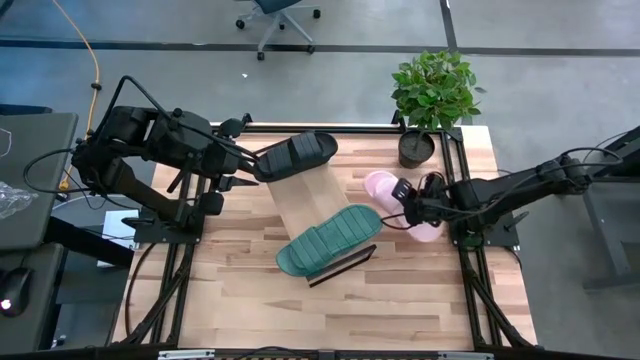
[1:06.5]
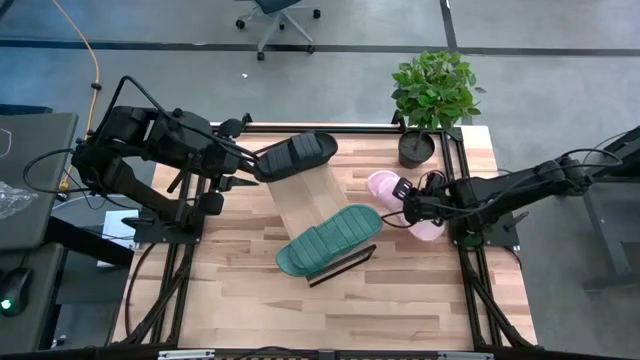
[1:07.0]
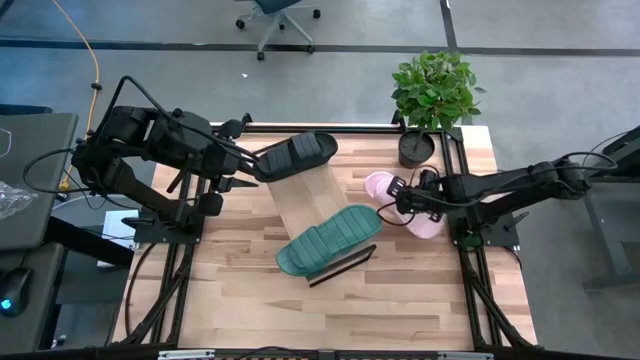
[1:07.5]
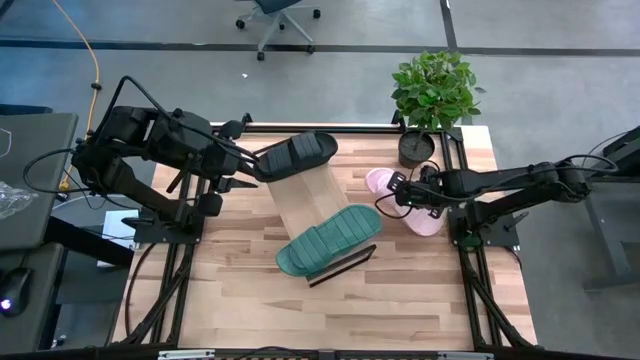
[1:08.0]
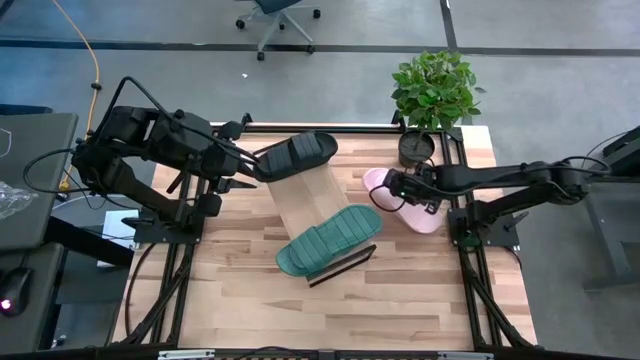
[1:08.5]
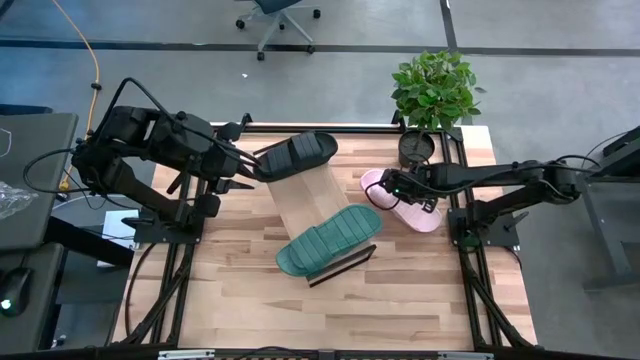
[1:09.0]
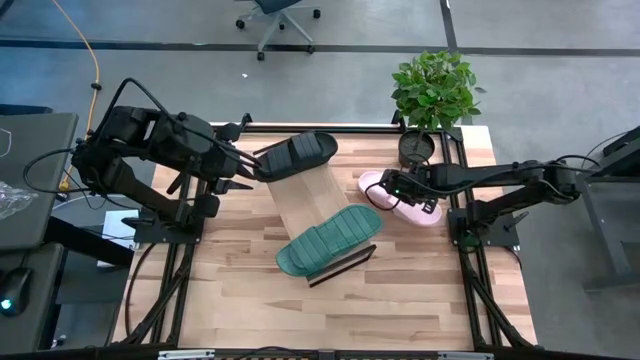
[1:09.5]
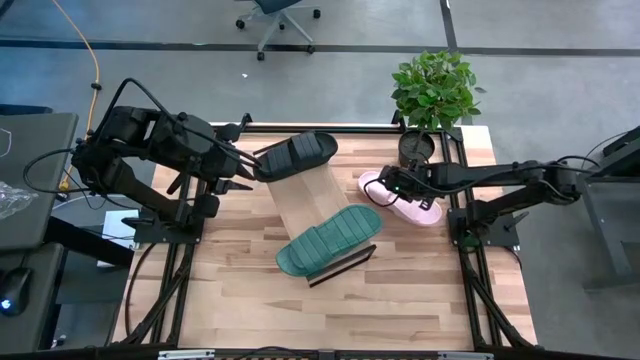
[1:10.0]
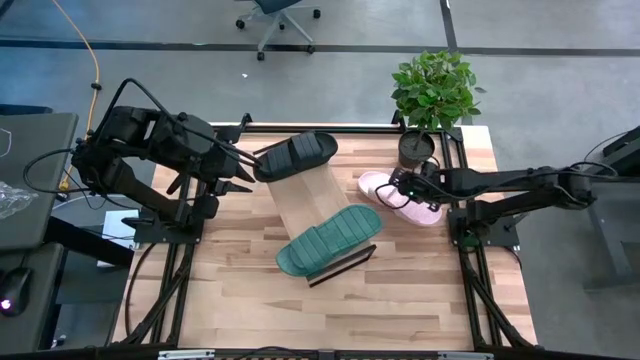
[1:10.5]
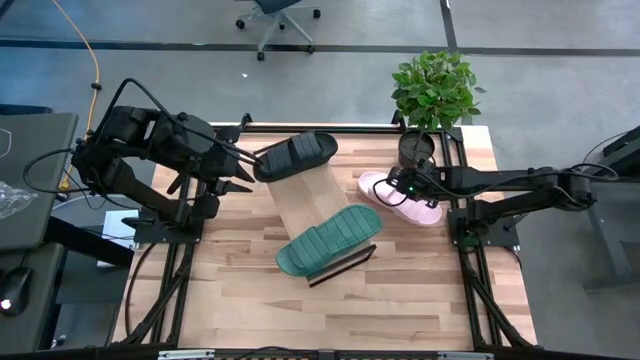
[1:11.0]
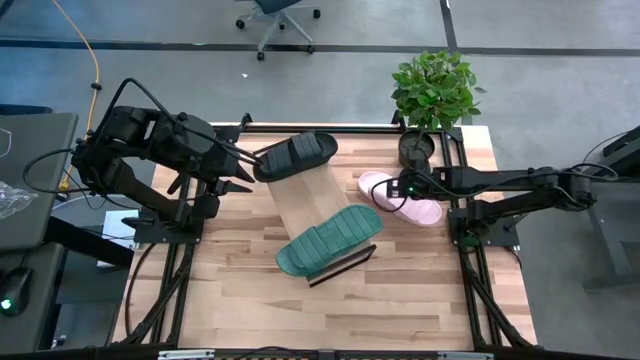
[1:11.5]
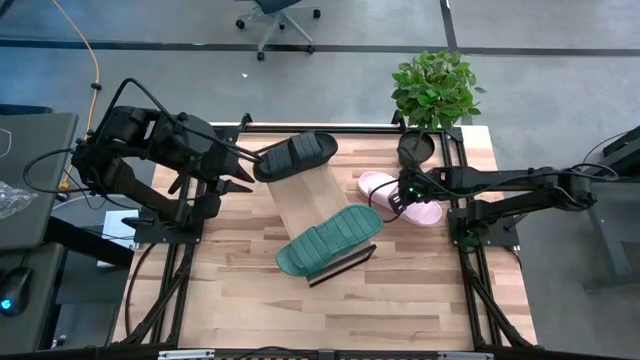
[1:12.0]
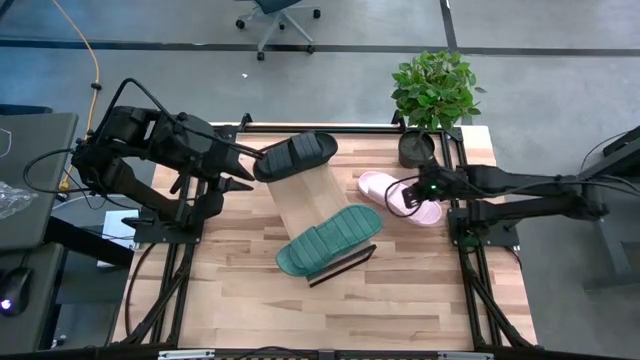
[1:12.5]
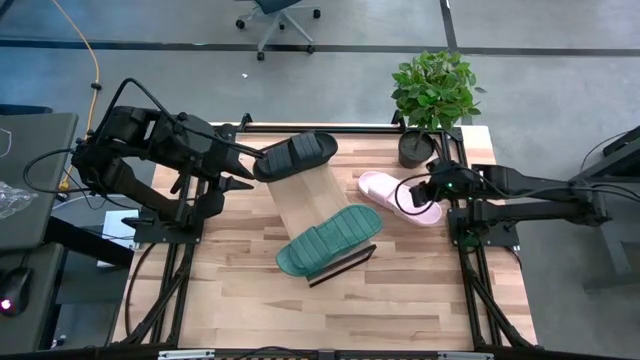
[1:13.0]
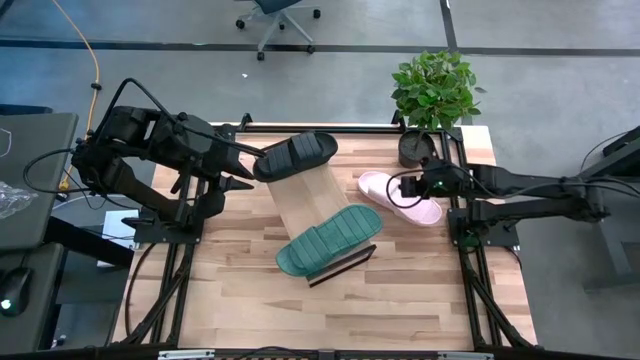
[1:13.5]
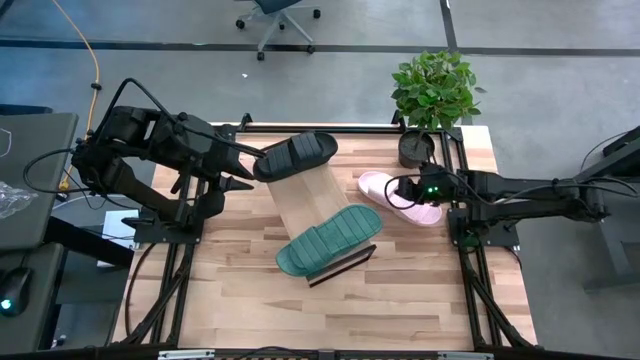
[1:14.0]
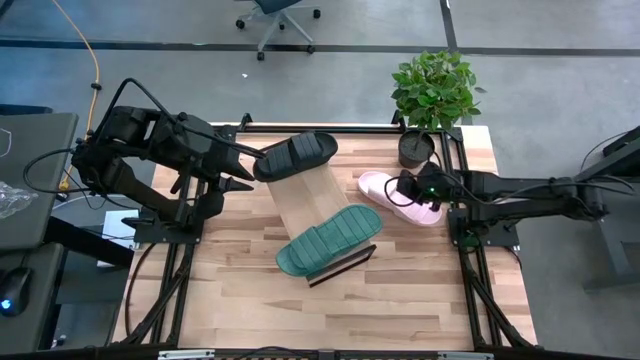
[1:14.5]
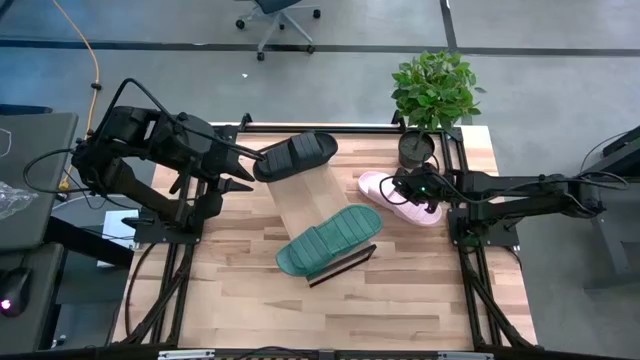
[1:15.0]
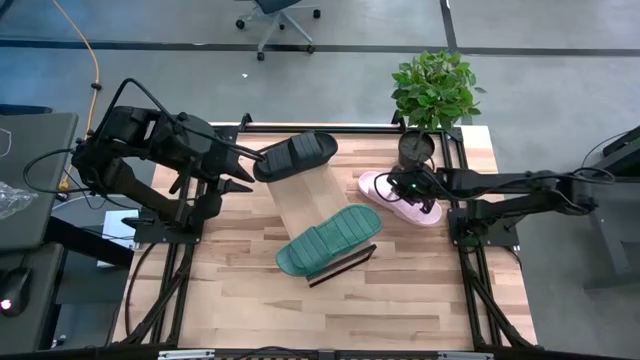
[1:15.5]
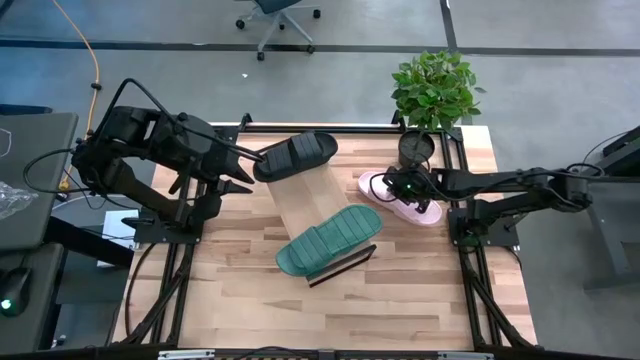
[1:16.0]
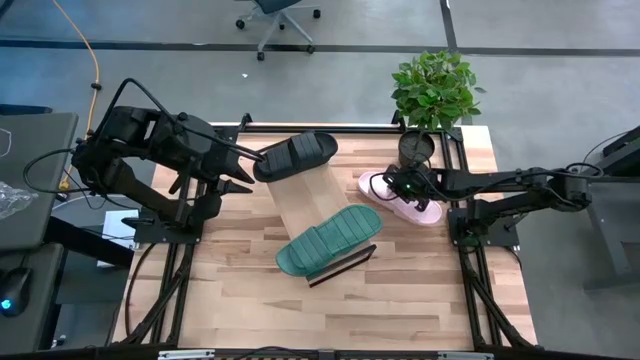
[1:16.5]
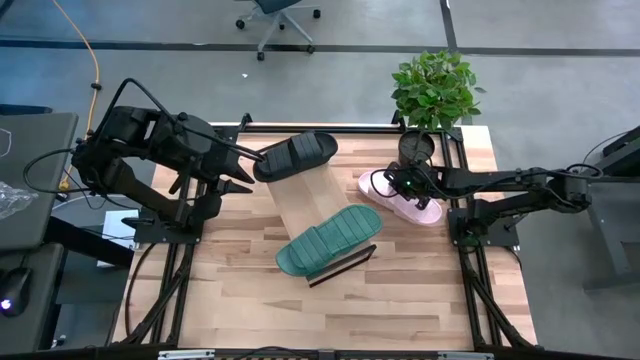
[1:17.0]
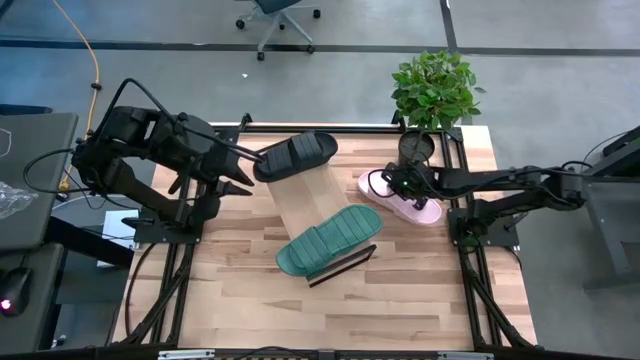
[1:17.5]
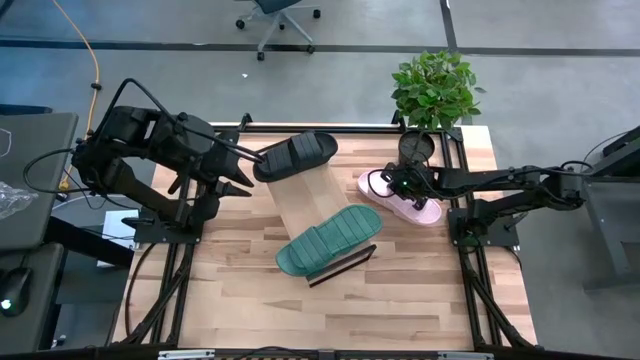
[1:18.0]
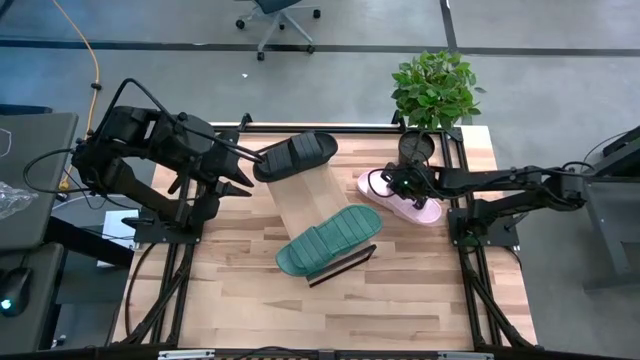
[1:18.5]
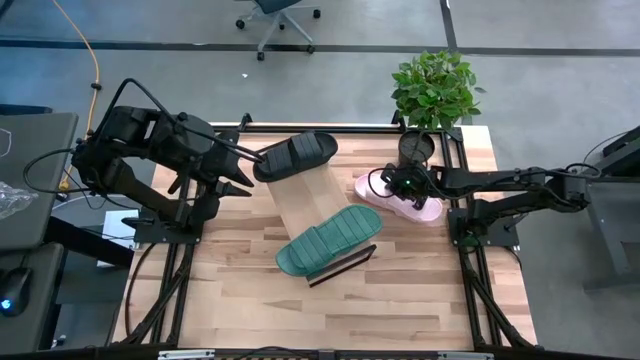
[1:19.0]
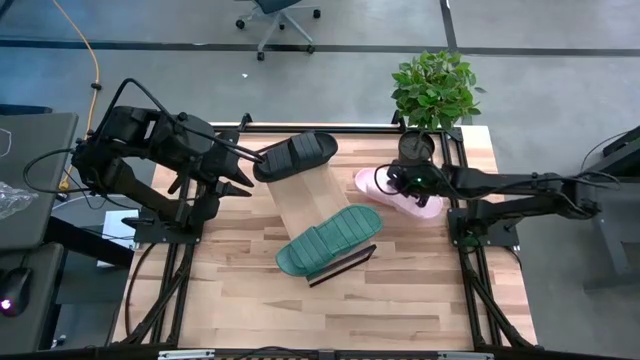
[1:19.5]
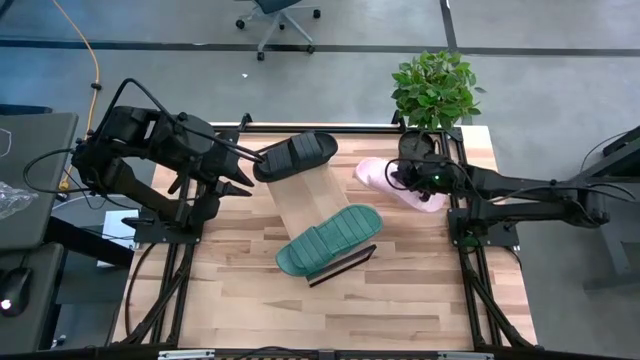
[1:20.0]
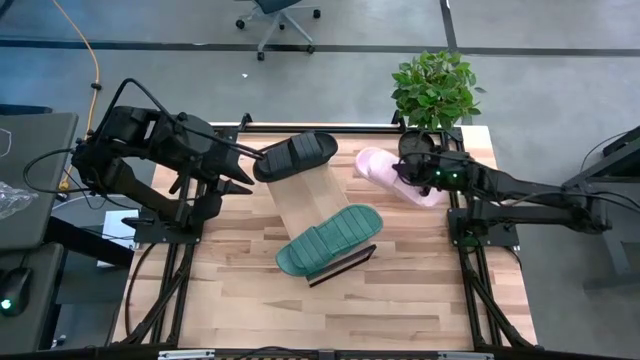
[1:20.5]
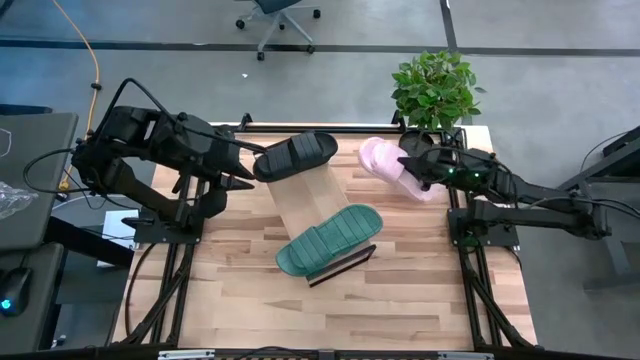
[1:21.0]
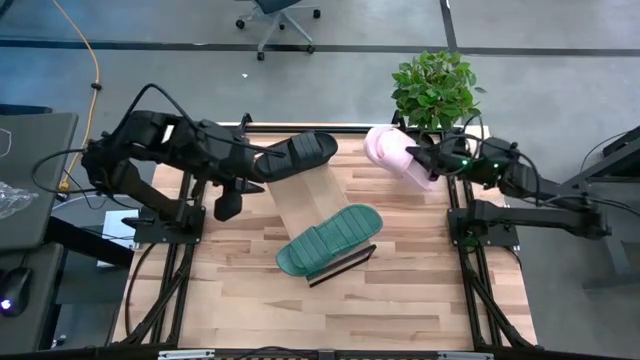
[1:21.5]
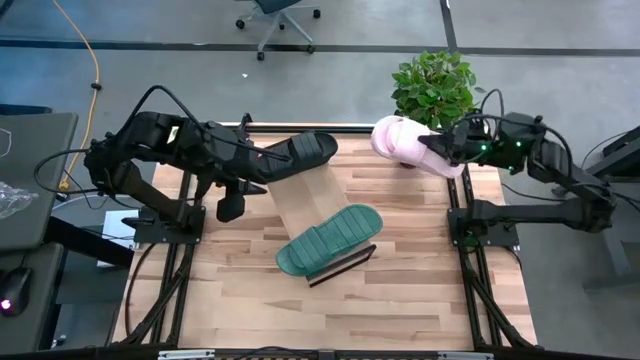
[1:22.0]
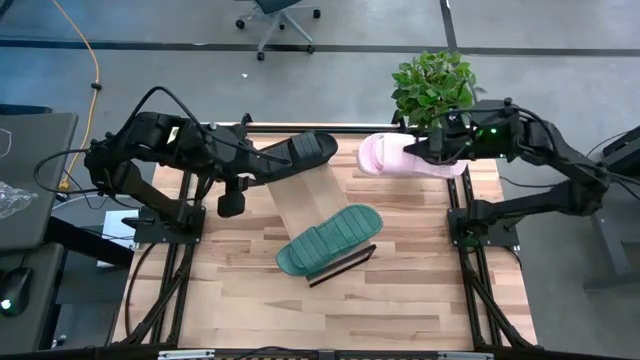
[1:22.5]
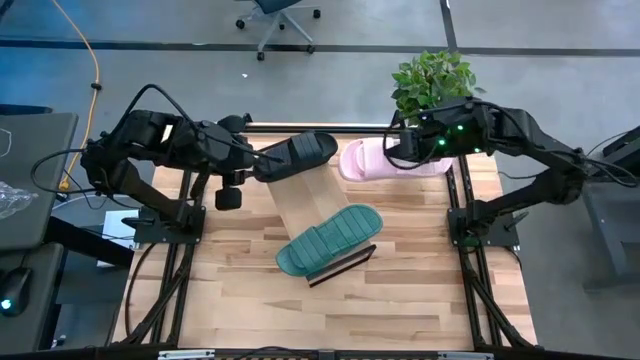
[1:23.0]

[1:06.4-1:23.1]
Task: Pick and place slides into the shelf
Put the pink pair of slides on the shelf

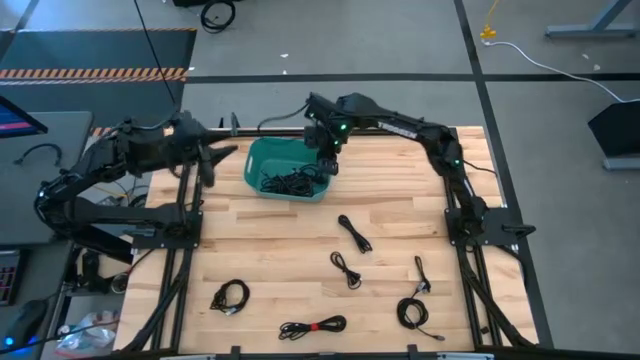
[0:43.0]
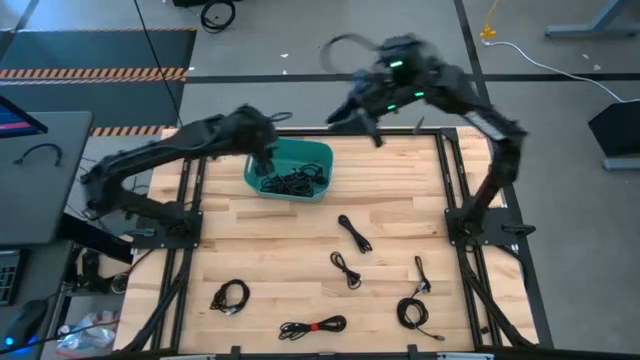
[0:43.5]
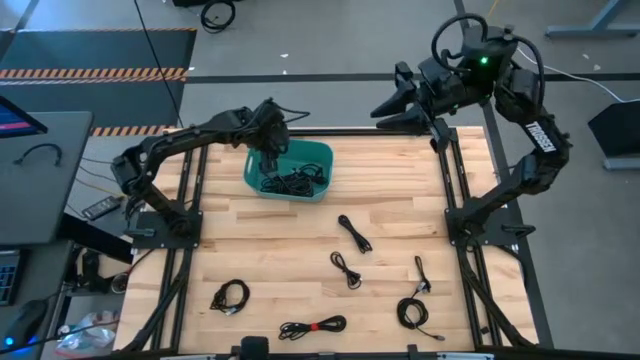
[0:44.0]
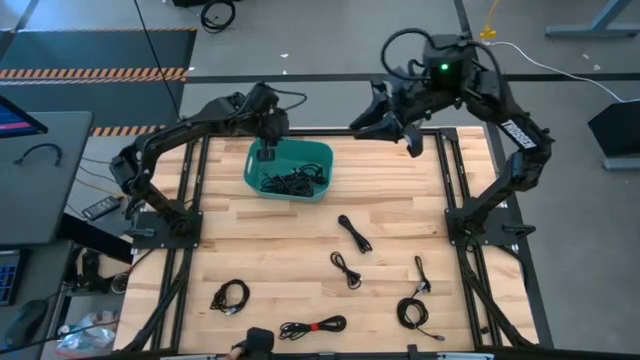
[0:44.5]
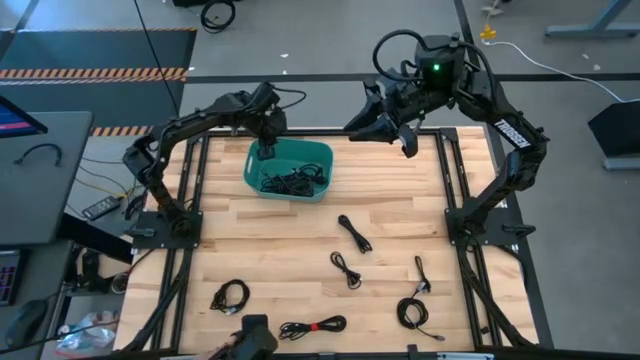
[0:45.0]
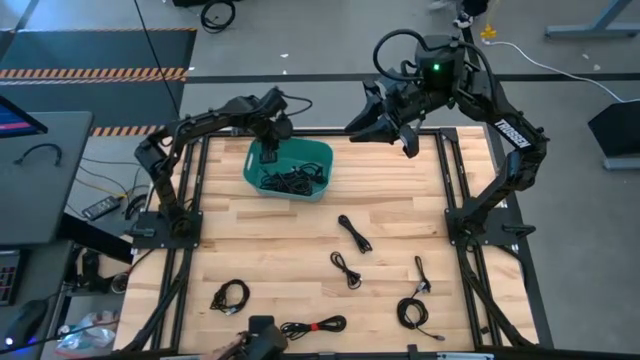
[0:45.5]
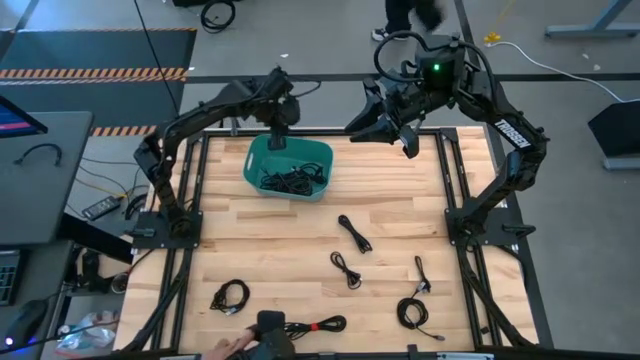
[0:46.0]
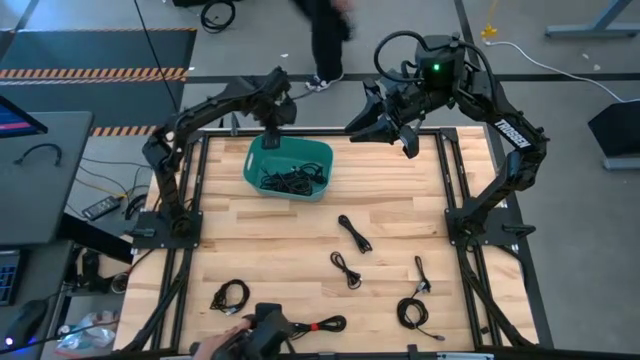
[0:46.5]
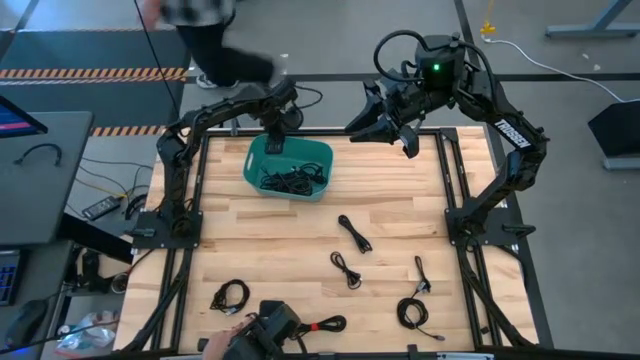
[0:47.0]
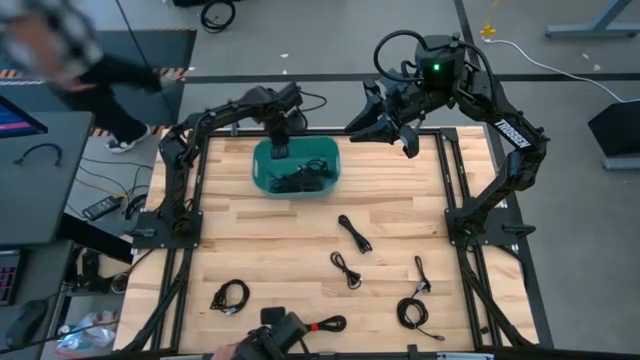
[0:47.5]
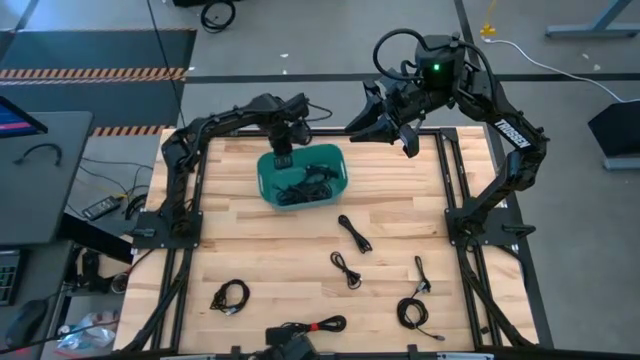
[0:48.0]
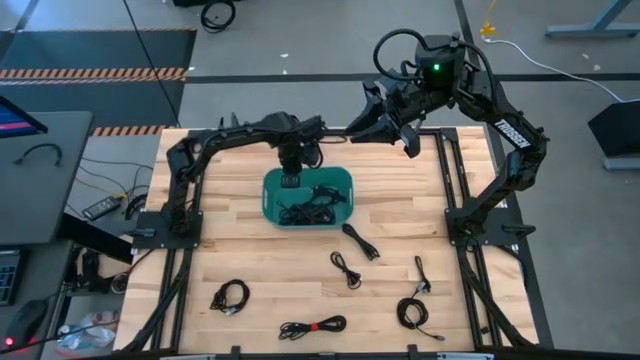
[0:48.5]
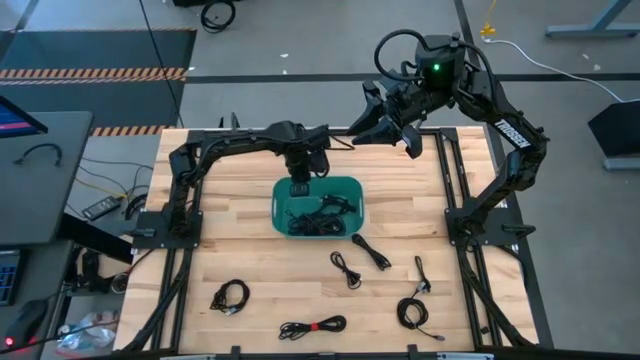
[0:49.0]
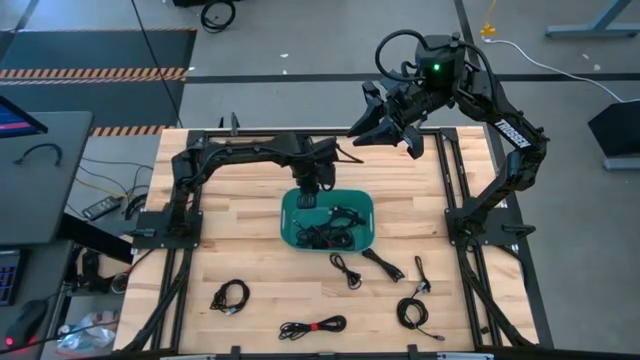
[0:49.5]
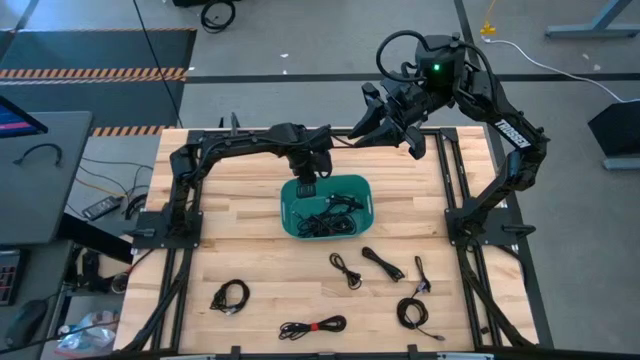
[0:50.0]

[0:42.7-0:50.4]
Task: Pick and place USB-C Cables
Move the green bin to the center of the table
